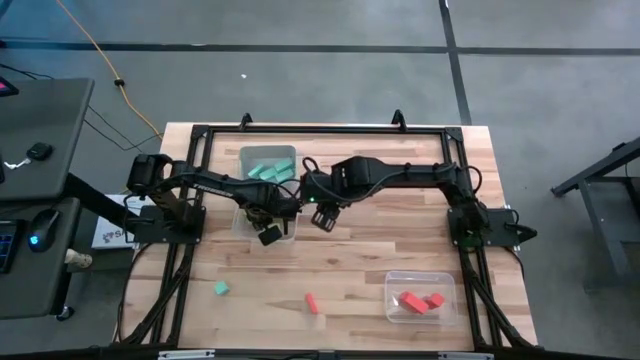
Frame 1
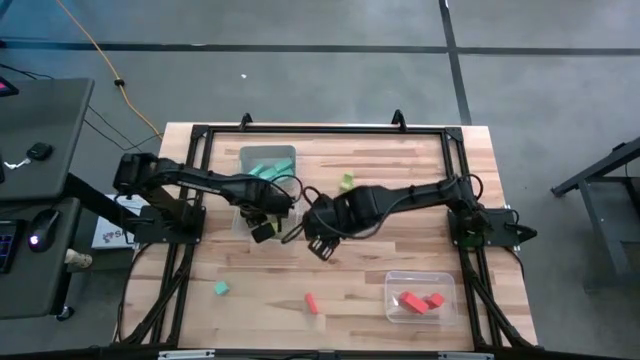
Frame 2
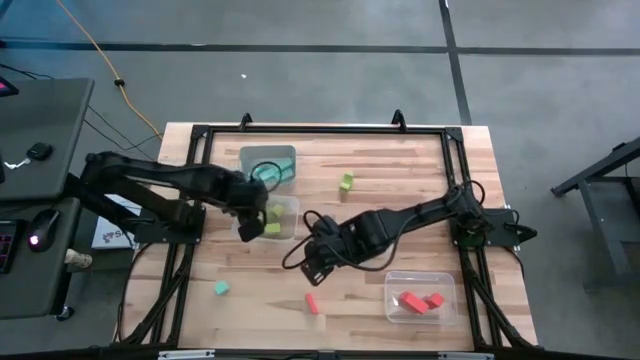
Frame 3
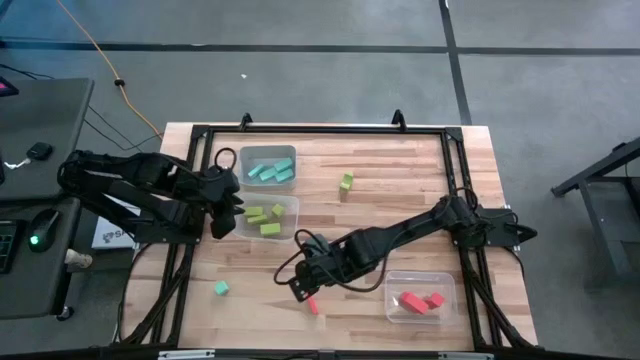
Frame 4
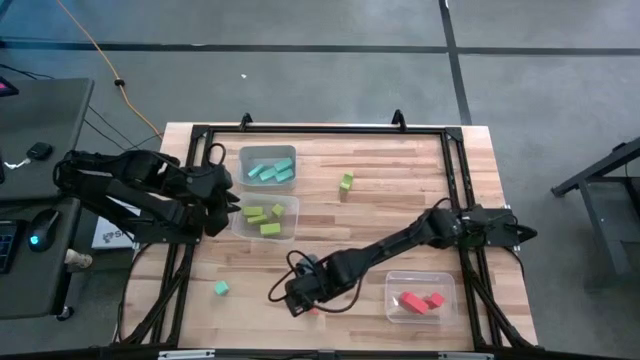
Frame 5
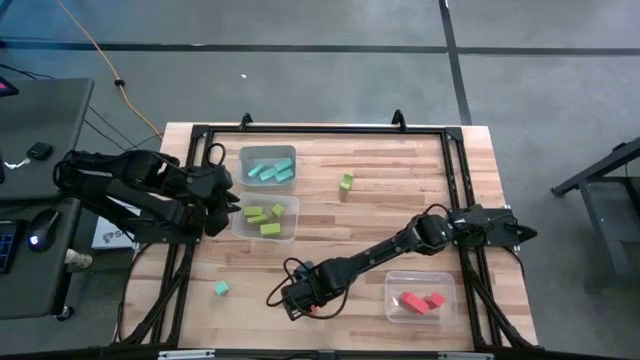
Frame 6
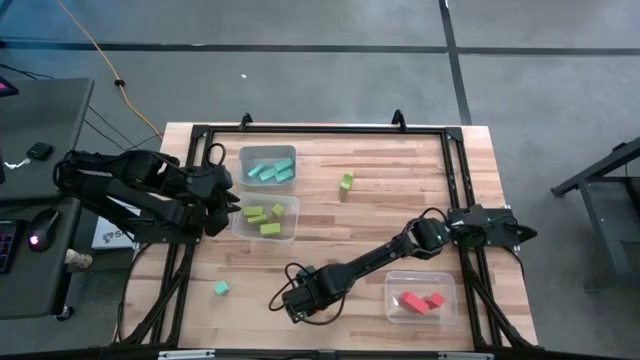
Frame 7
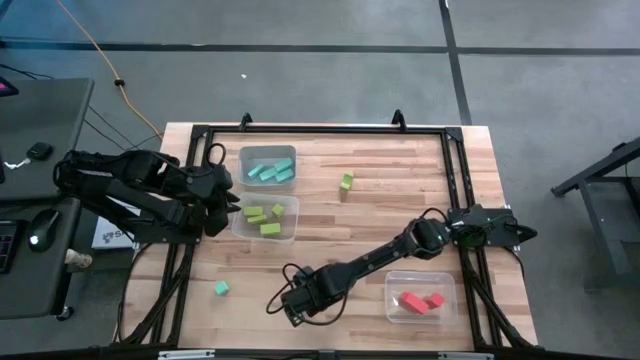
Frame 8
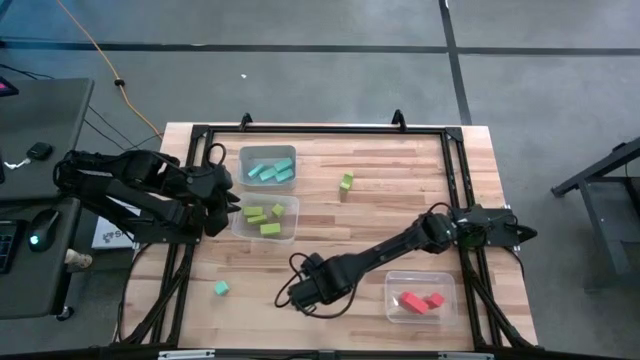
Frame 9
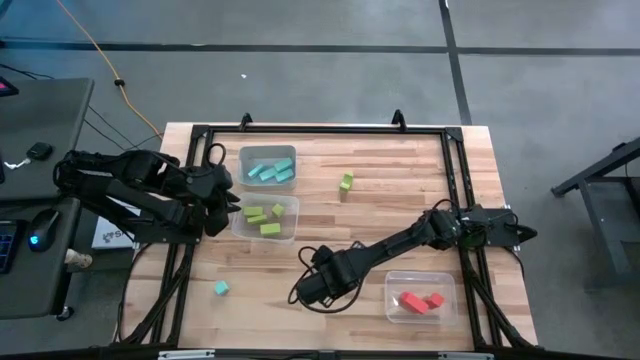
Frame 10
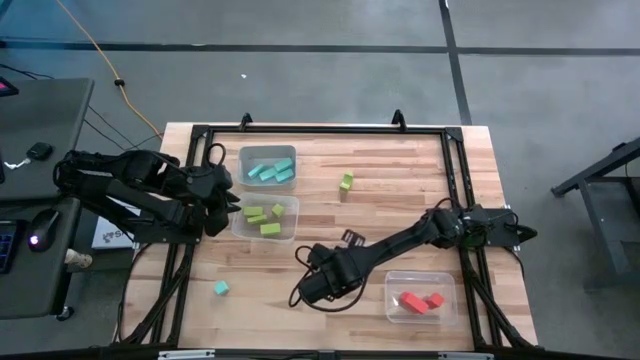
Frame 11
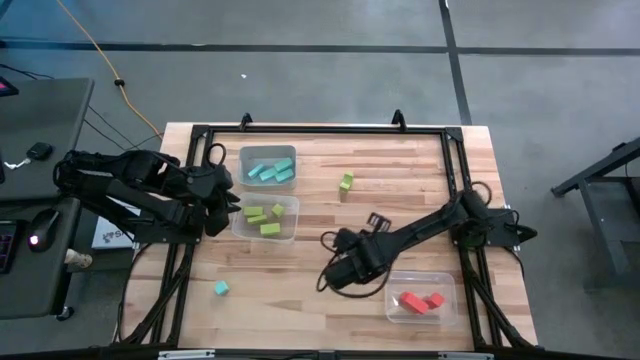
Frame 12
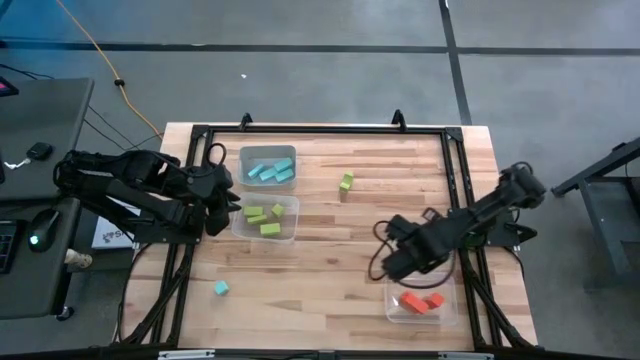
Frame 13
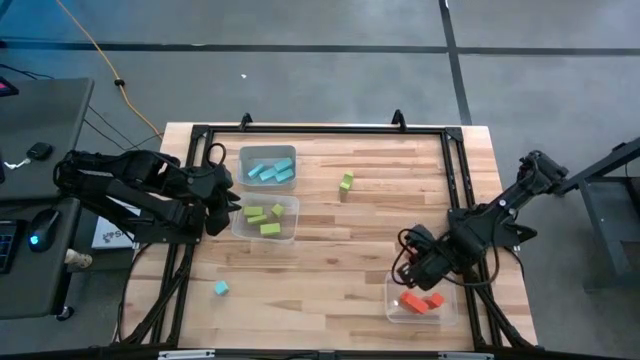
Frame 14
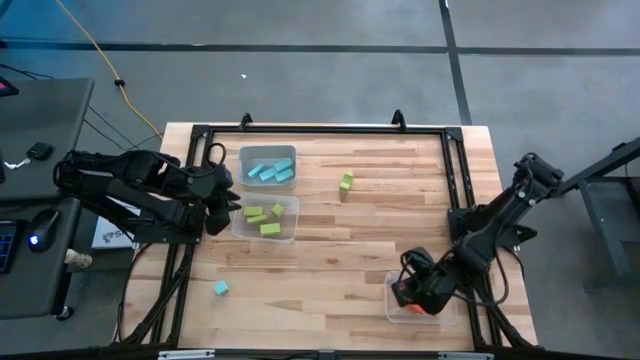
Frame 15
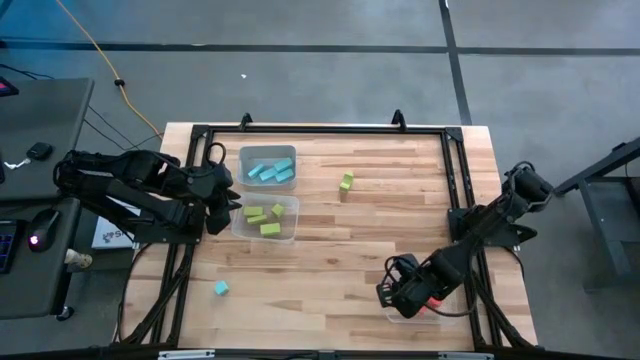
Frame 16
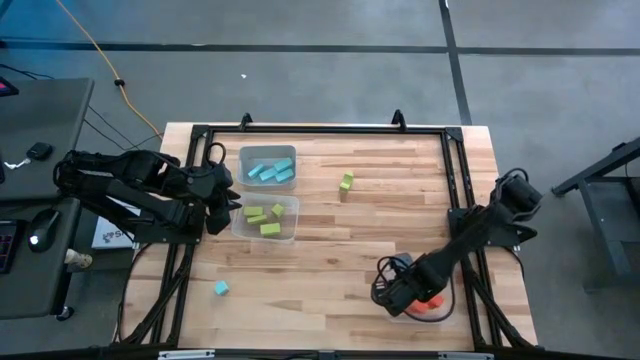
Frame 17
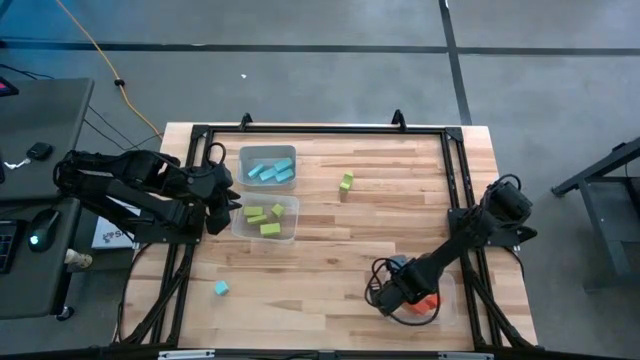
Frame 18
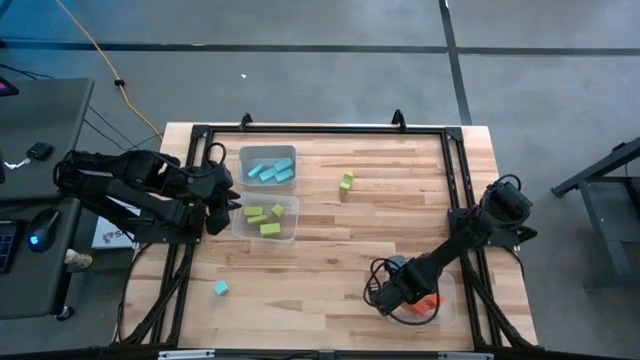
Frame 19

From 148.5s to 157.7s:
Task: Sort & place blocks by color
Put the orange block into the right transparent bin

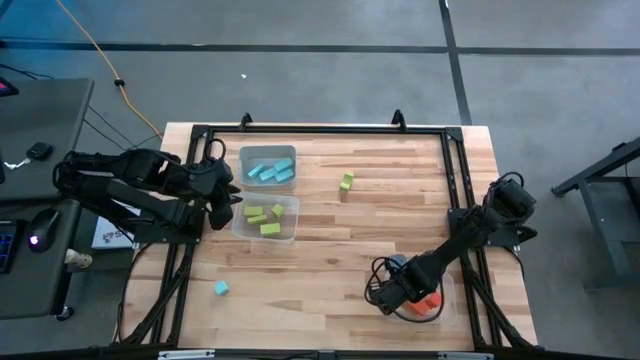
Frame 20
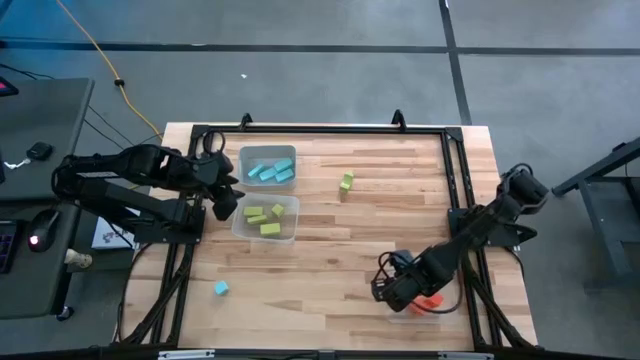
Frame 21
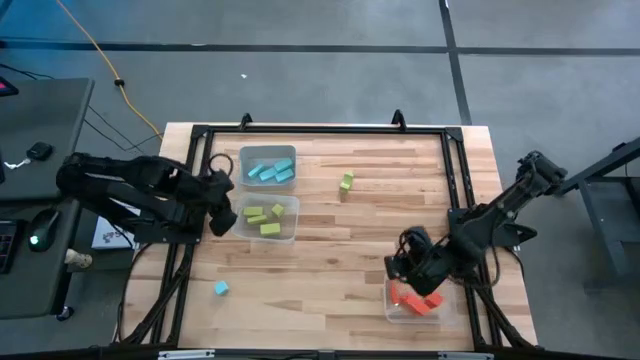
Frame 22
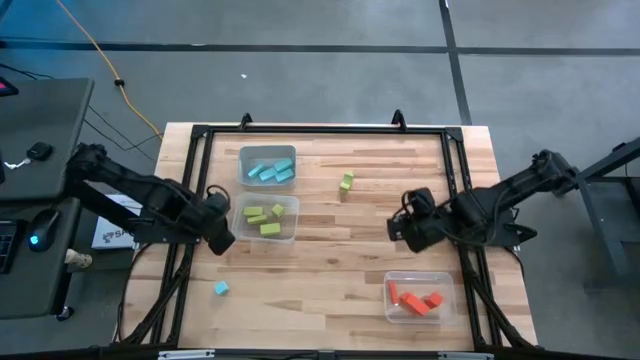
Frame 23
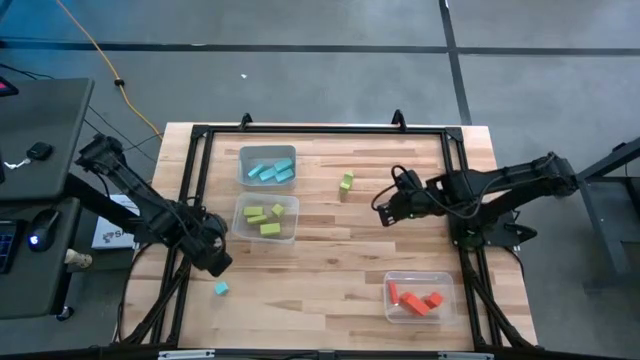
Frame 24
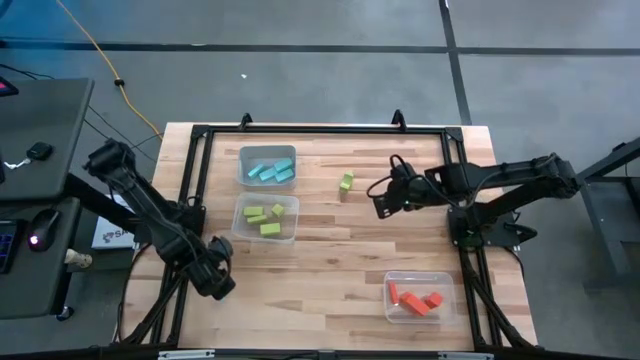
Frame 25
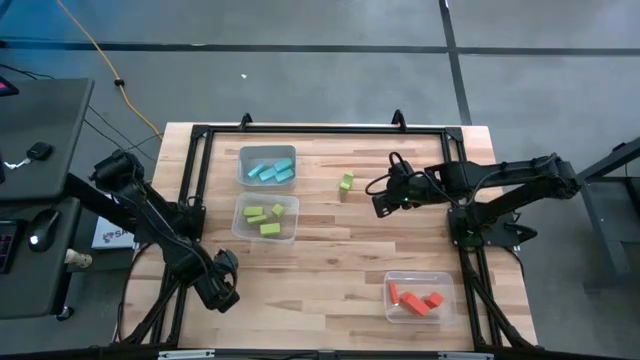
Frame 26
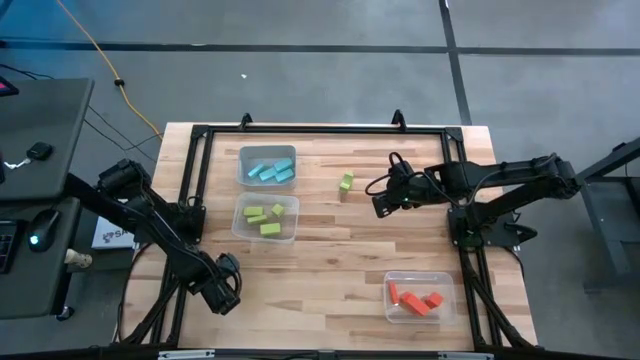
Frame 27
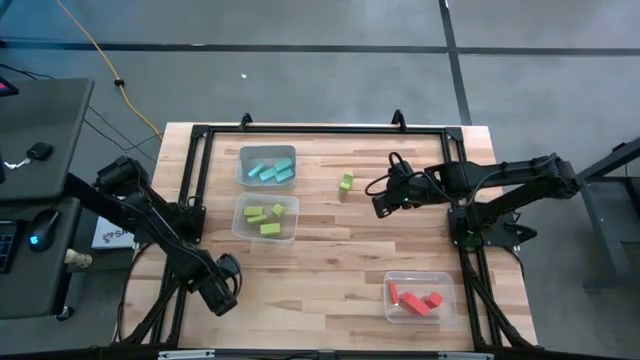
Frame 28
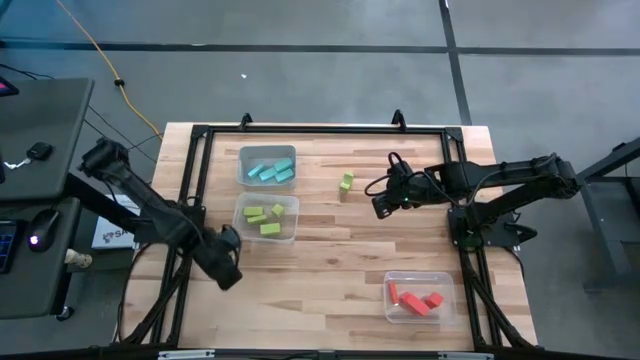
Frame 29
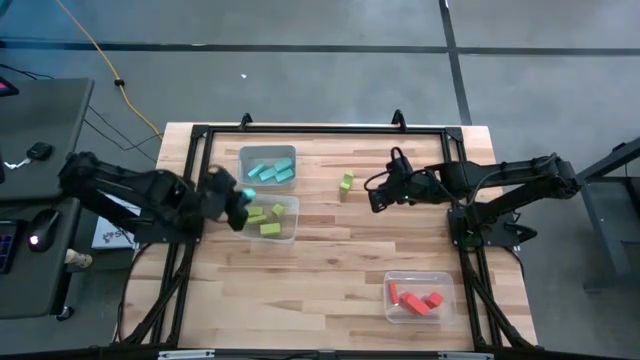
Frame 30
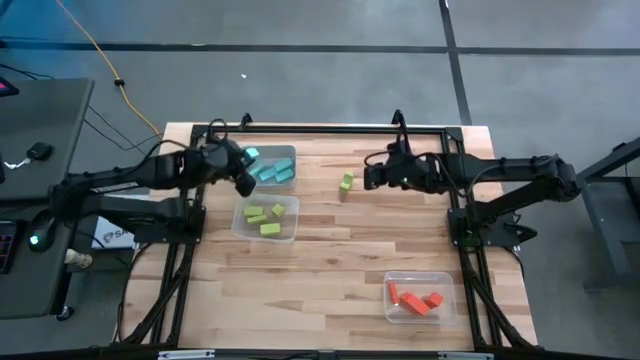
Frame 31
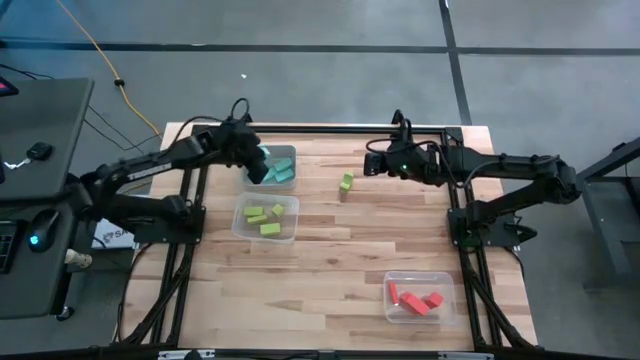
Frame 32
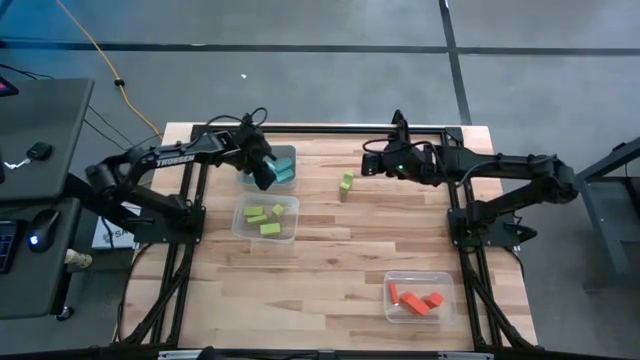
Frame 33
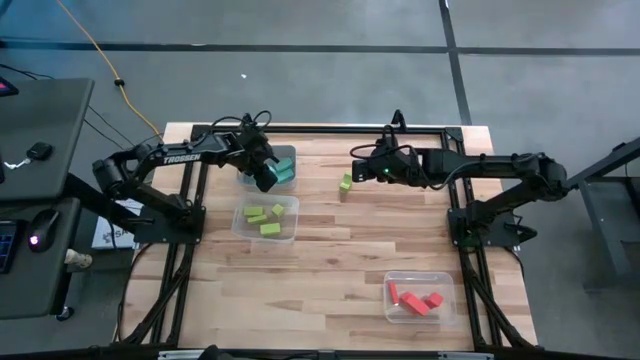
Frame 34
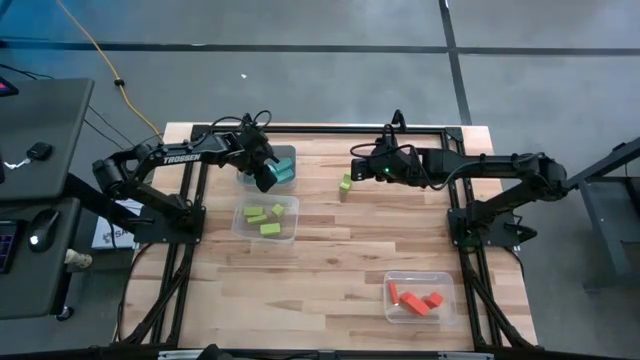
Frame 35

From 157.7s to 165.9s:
Put the blue block into the gray bin

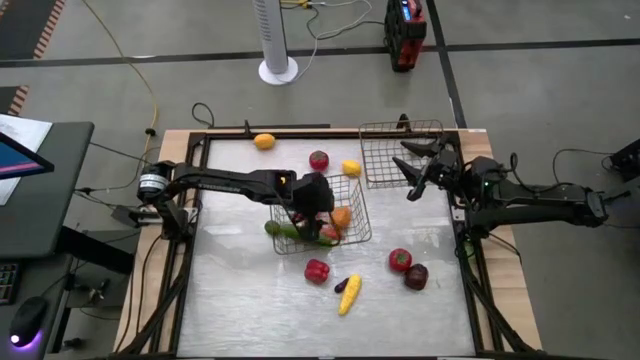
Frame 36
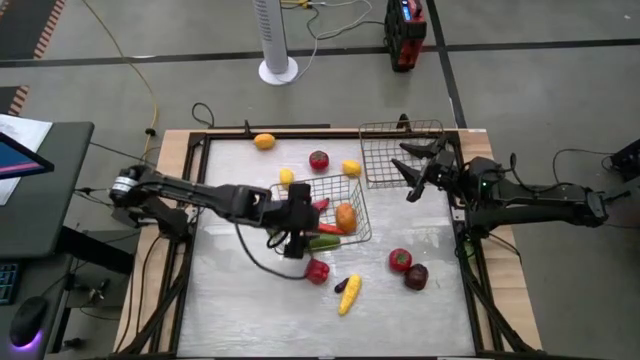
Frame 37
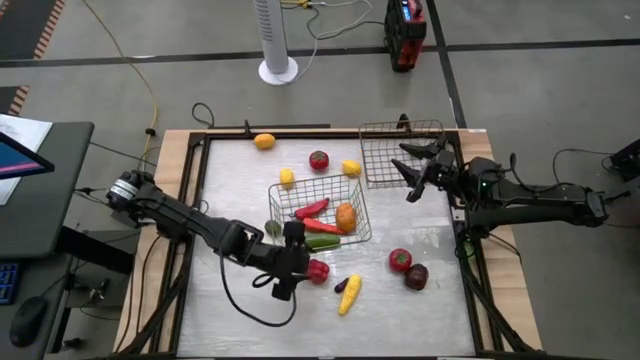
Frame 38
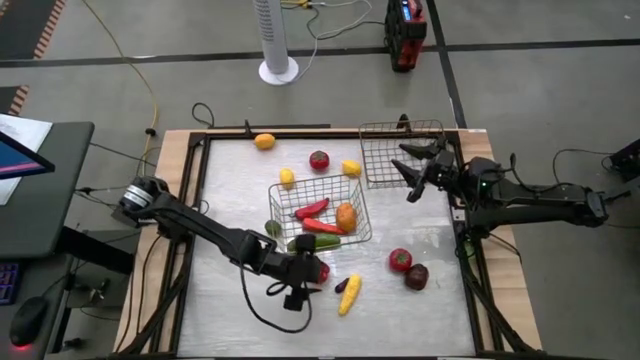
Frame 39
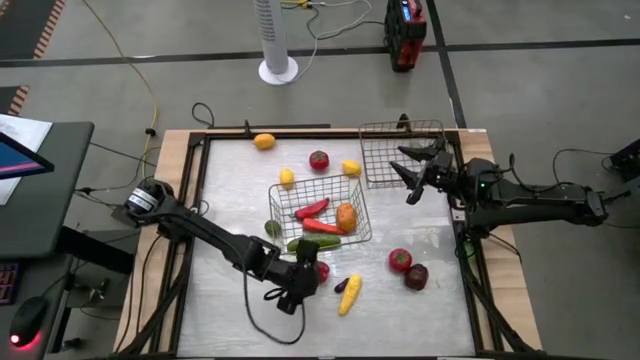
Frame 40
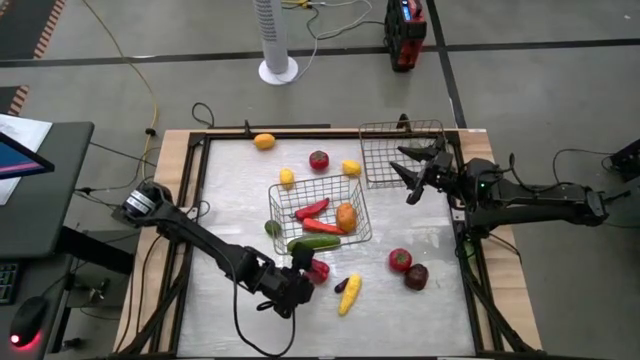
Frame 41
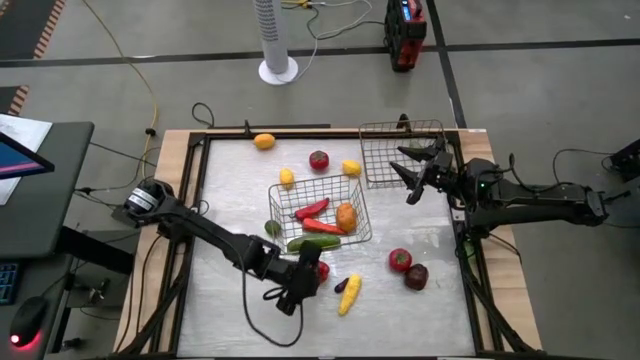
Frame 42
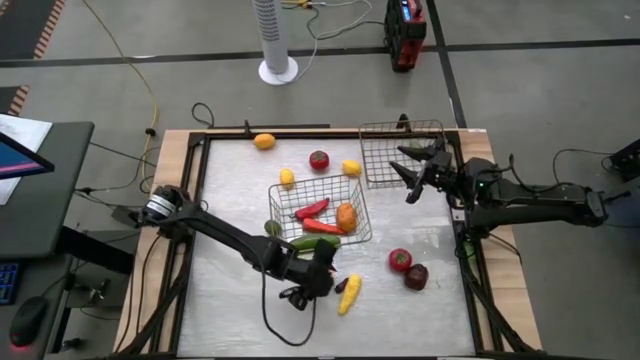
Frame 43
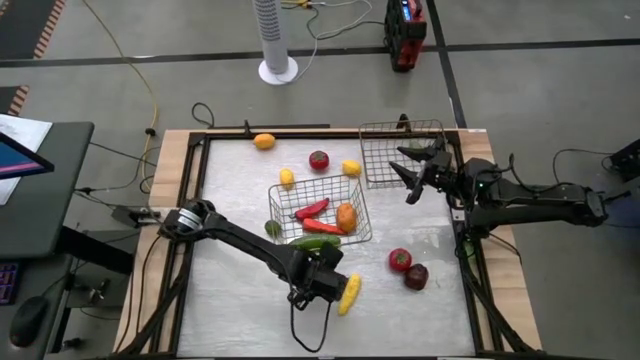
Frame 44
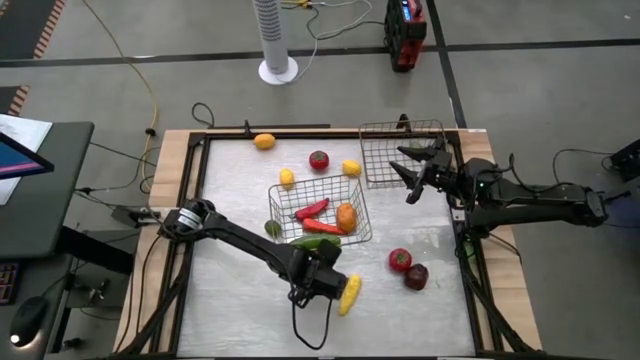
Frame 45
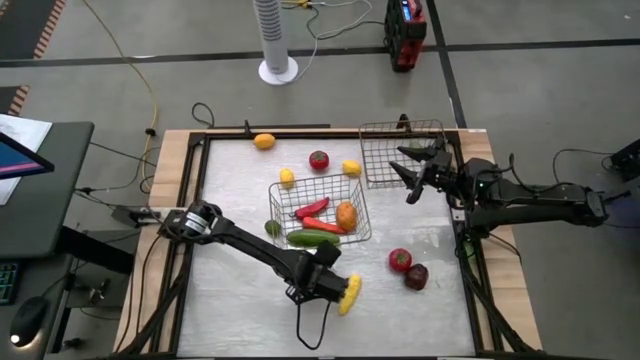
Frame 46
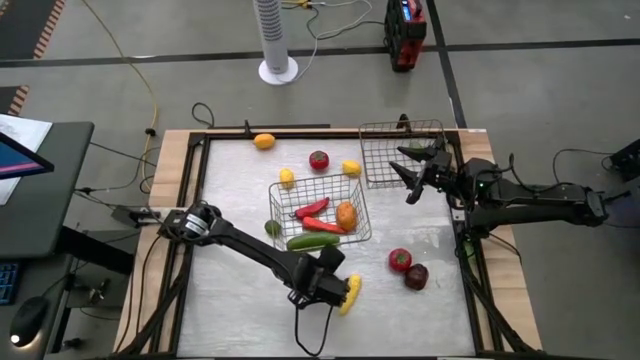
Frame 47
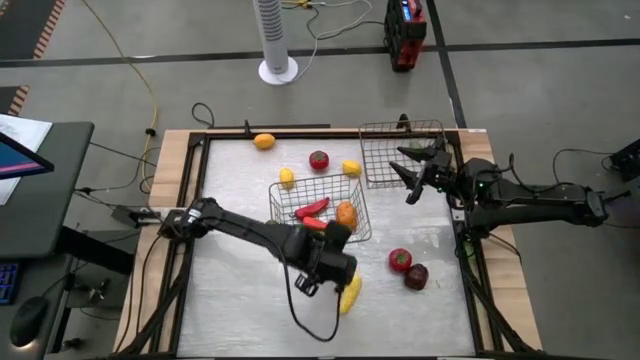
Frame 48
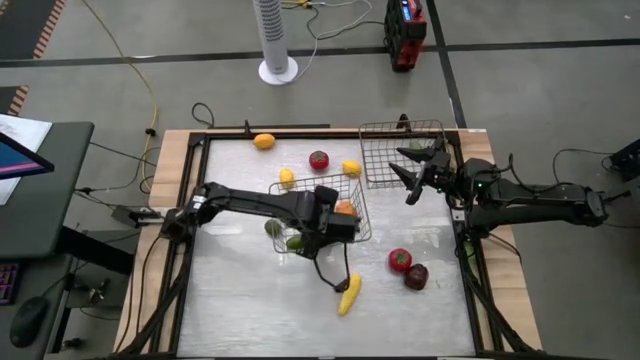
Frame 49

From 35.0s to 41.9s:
Task: Sort produce into baskets
Put the red bell pepper into the left wire basket
